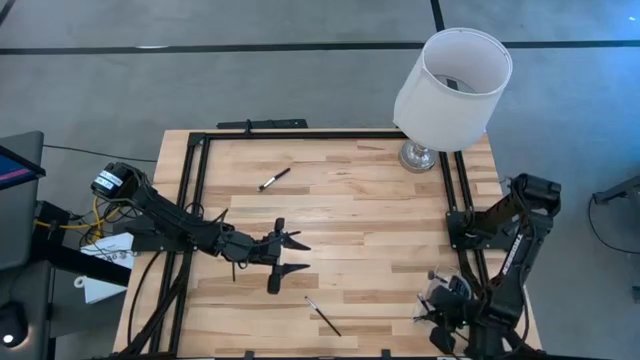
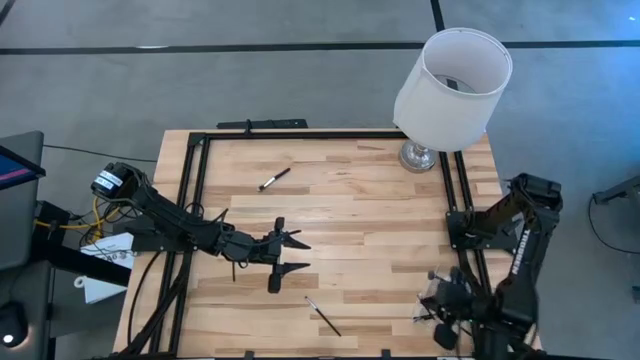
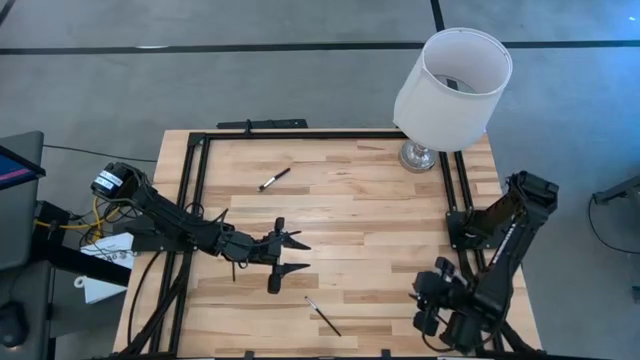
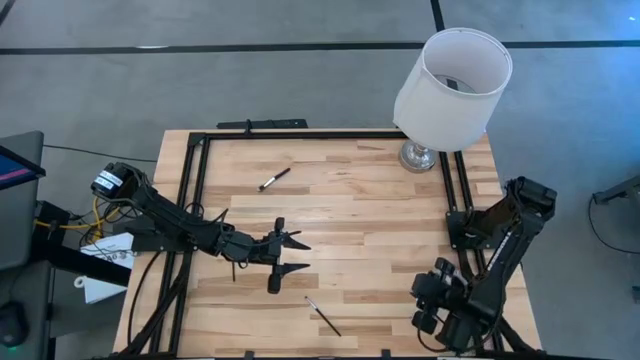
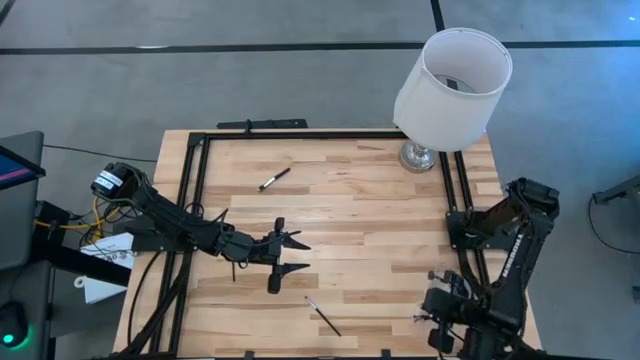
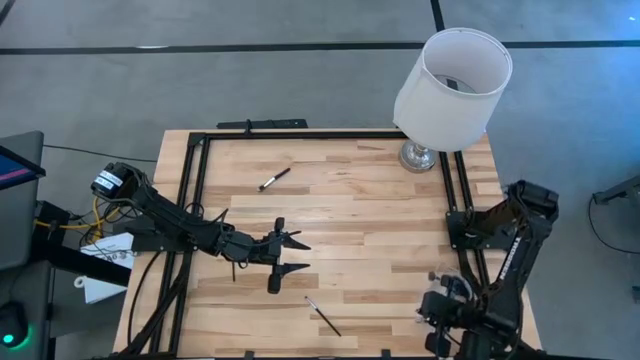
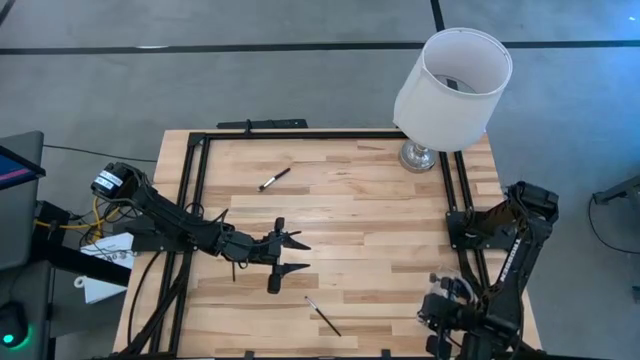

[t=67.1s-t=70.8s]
Task: Pick & Place Makeup Brushes
Adjust the brushes in the transparent organizer

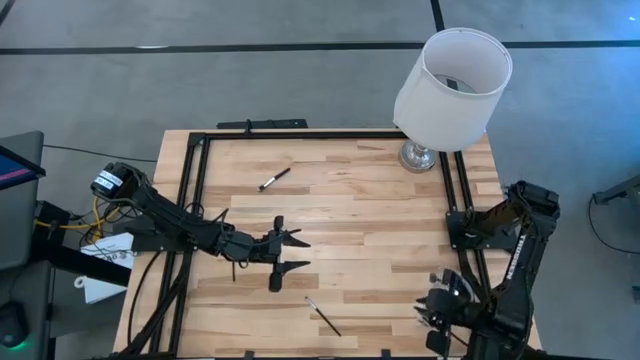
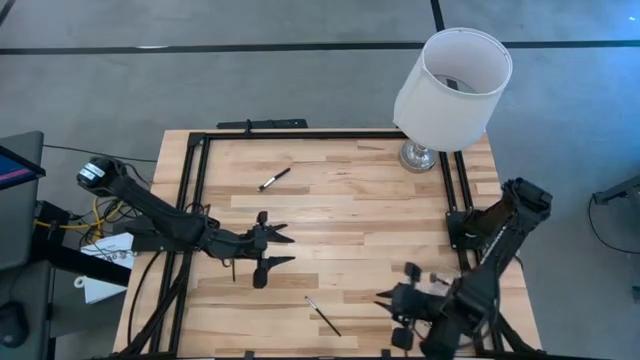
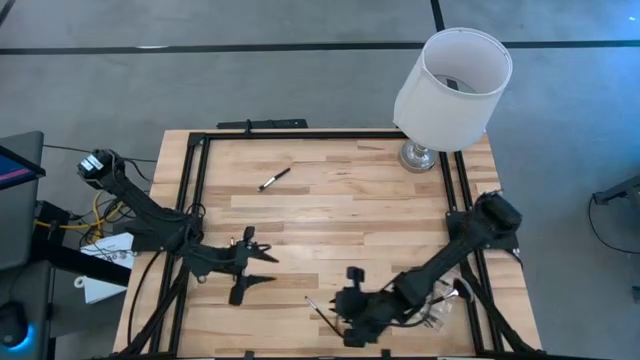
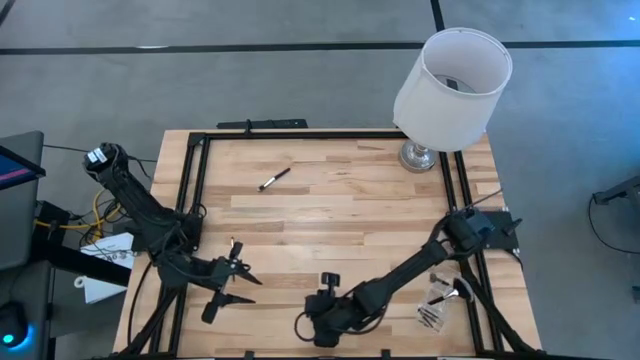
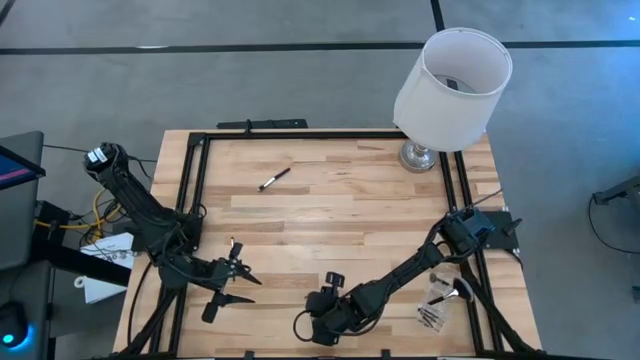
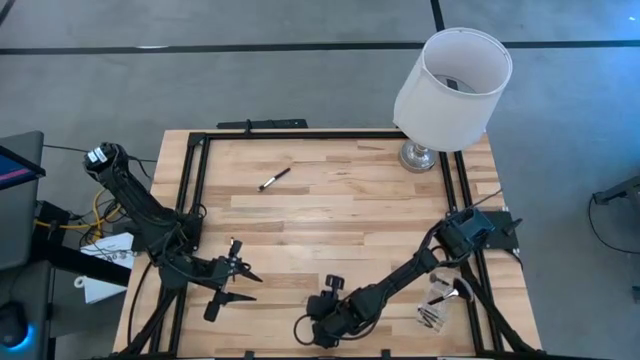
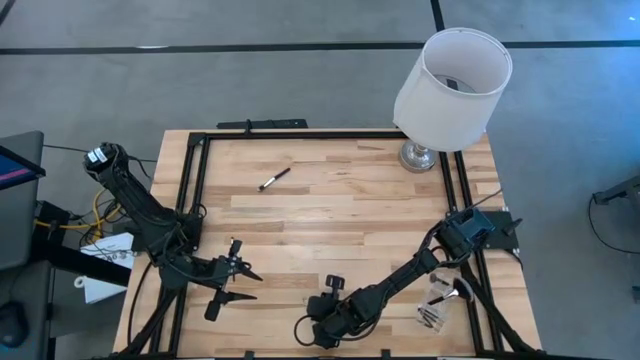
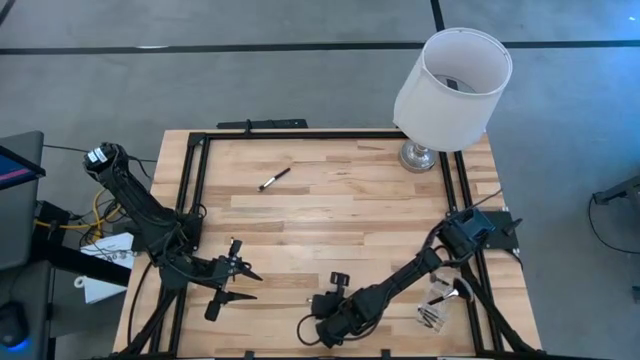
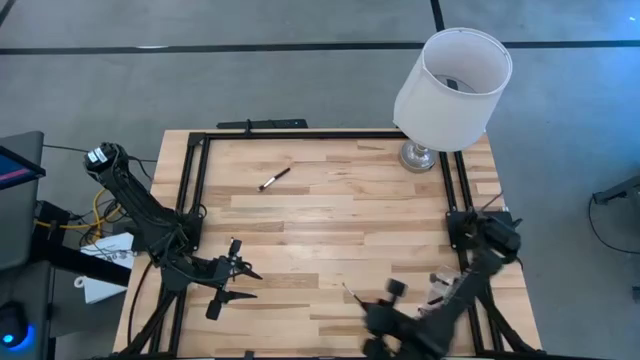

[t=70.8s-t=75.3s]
Put the black eyeshadow brush into the transparent organizer

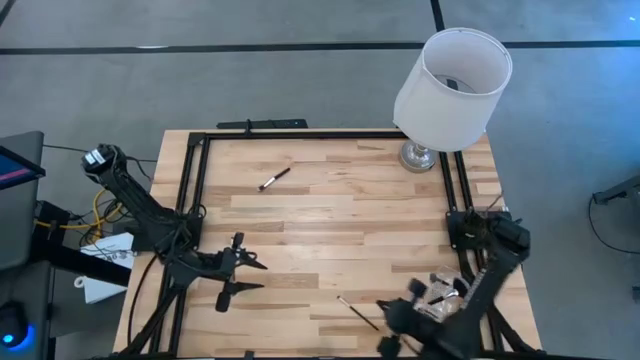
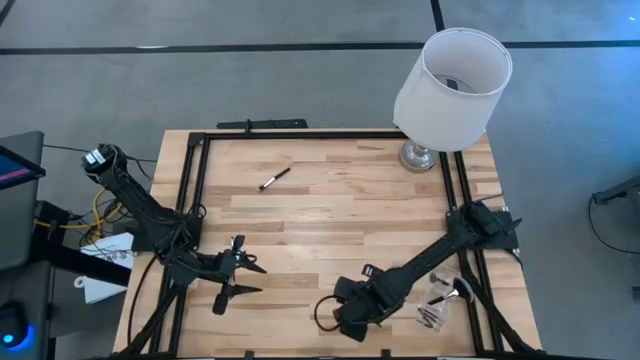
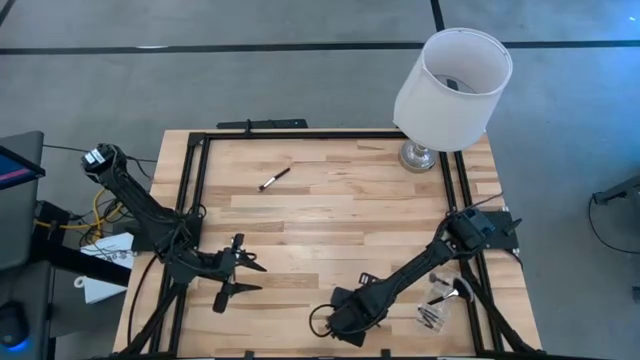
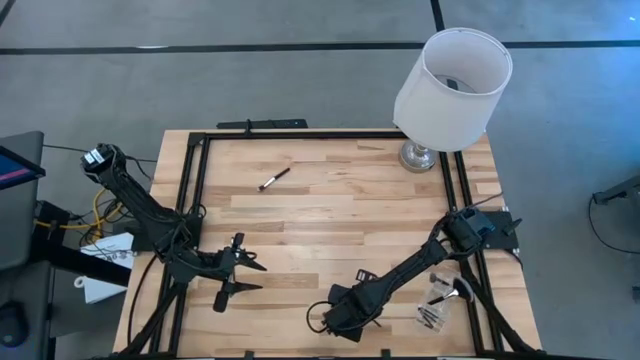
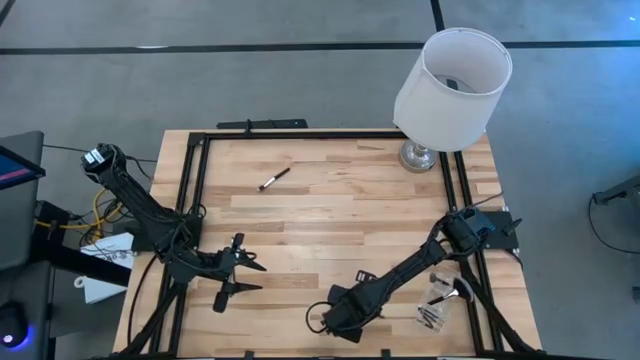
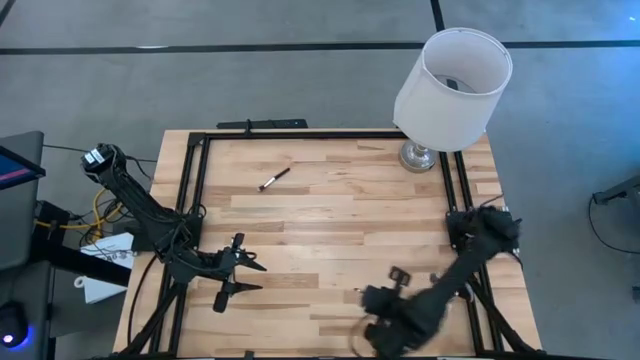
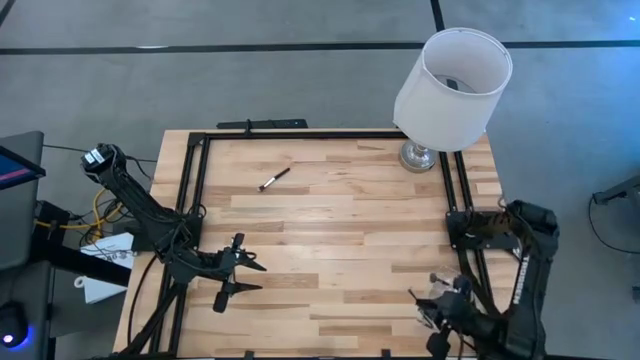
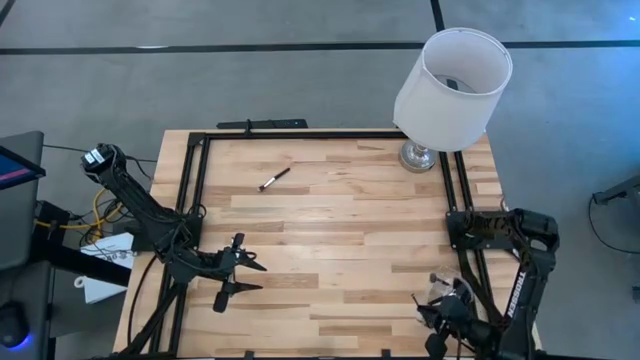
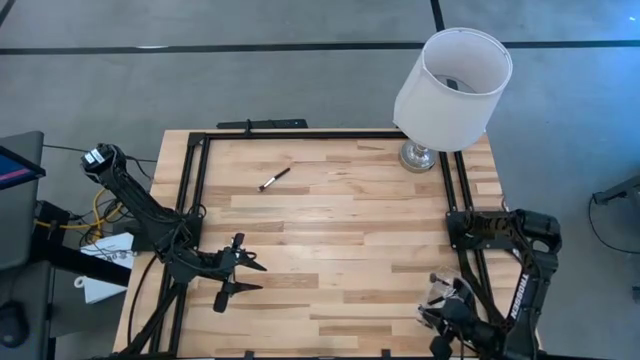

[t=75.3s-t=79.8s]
Put the black eyeshadow brush into the transparent organizer

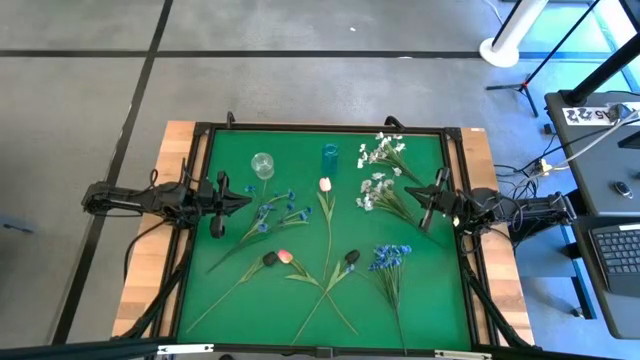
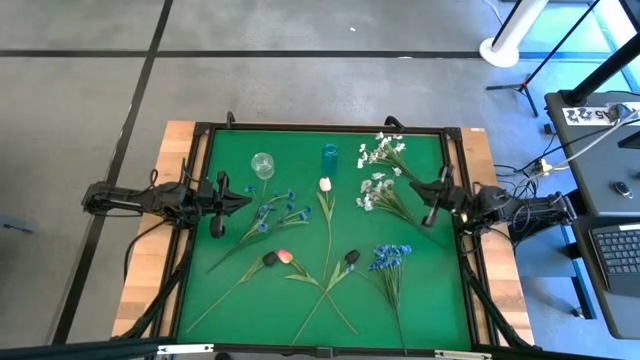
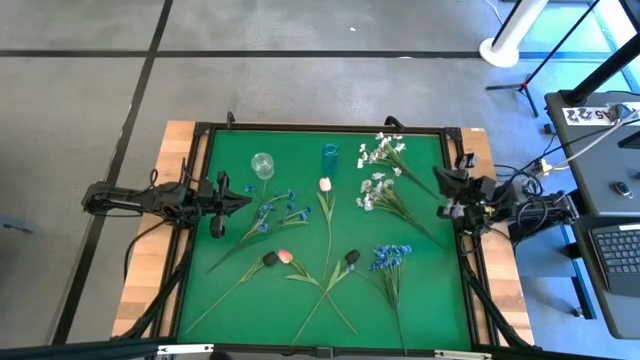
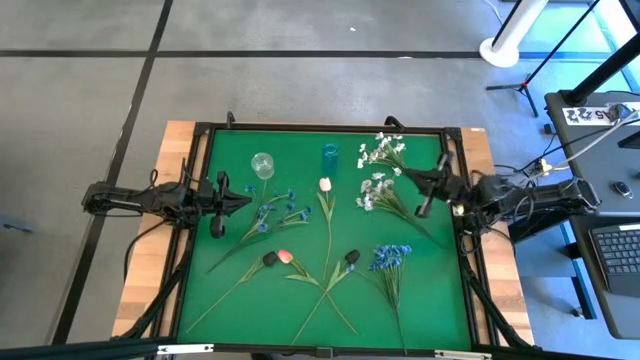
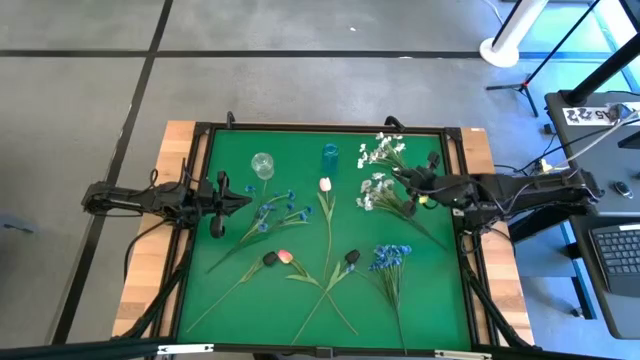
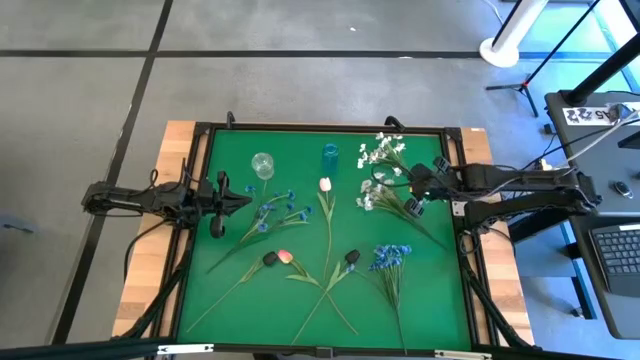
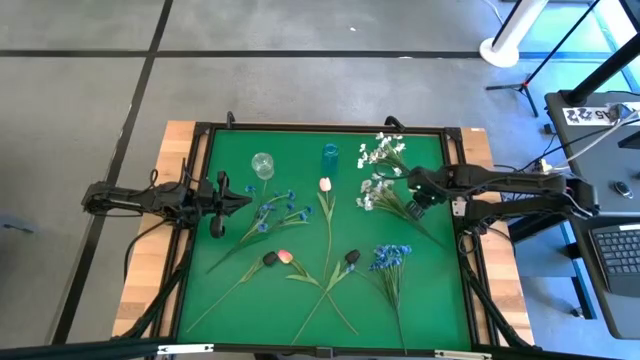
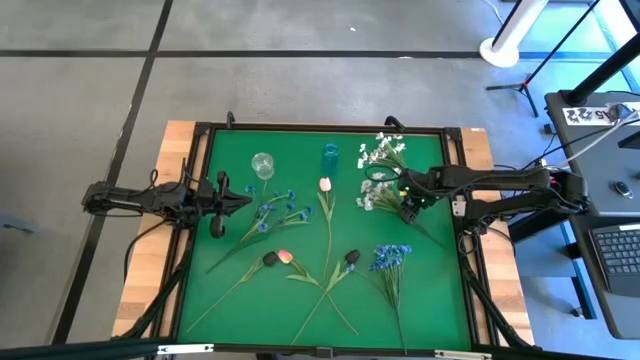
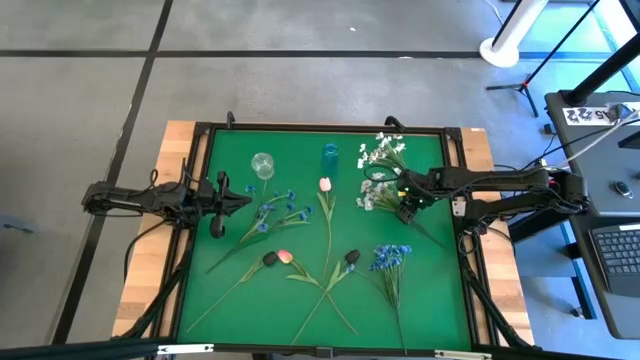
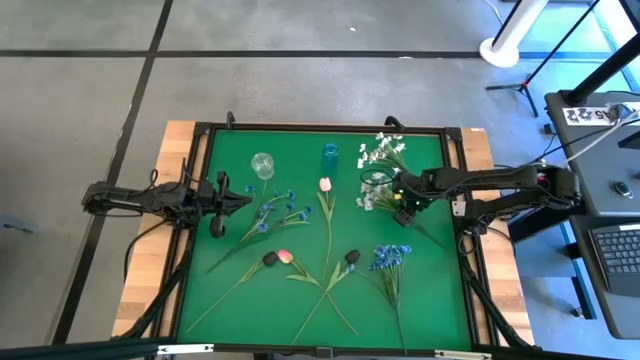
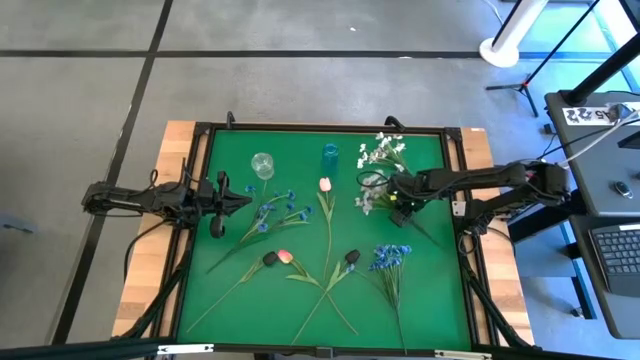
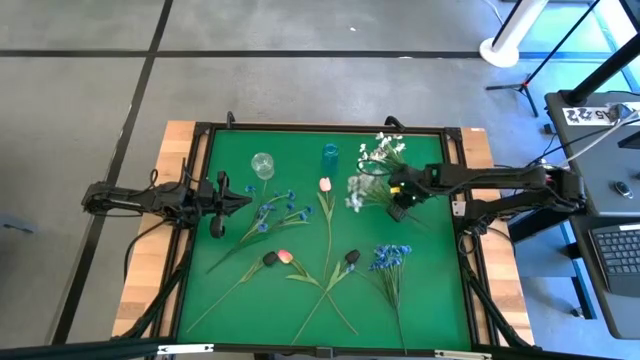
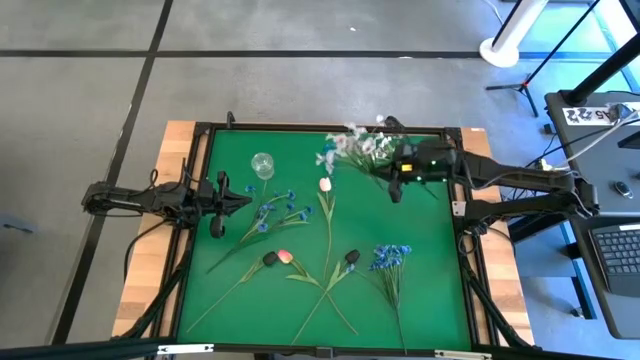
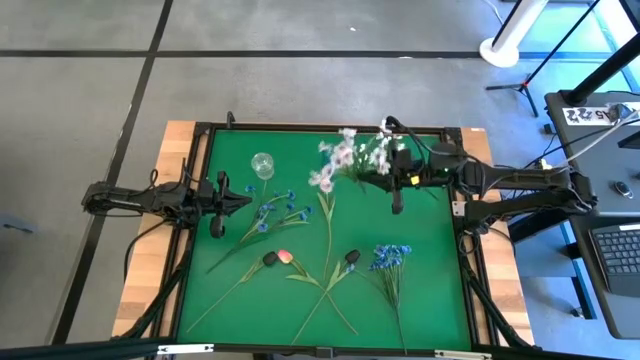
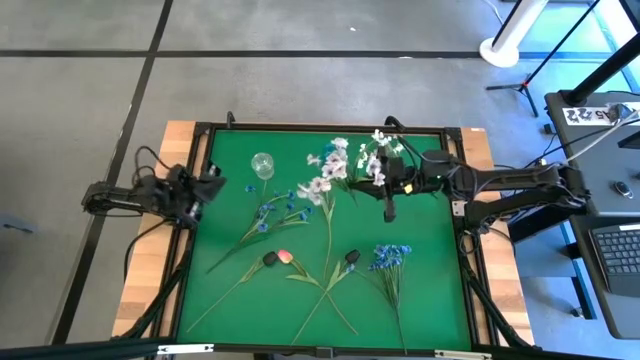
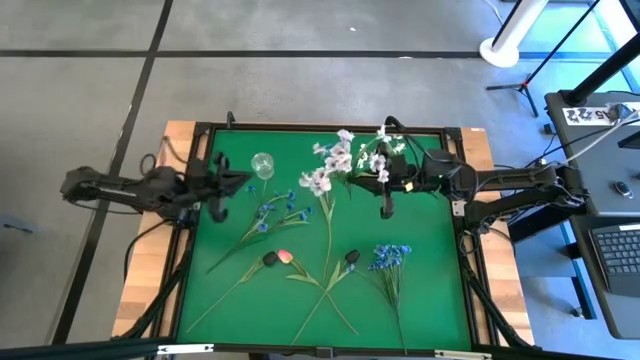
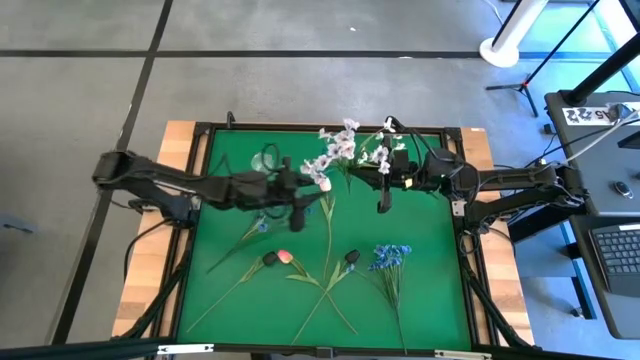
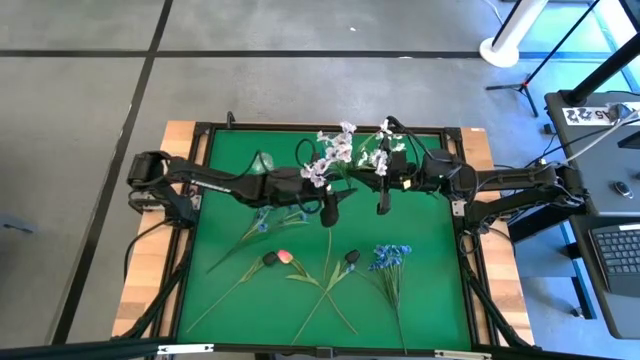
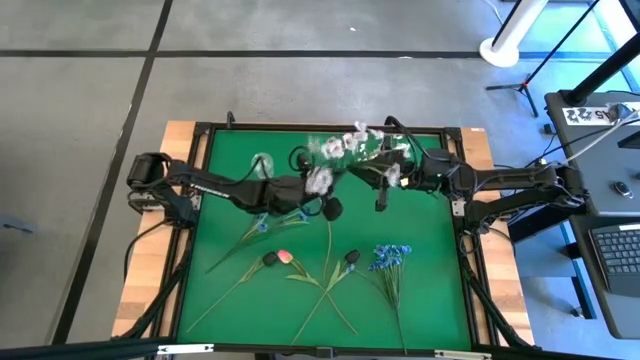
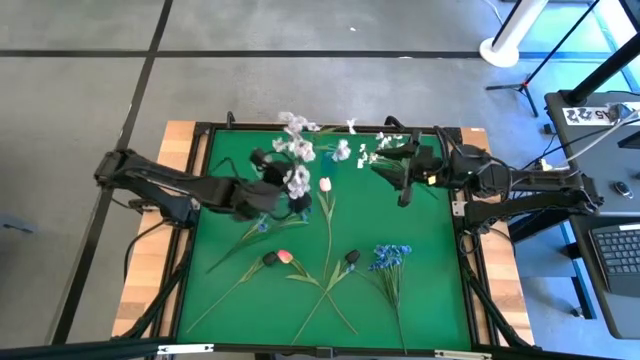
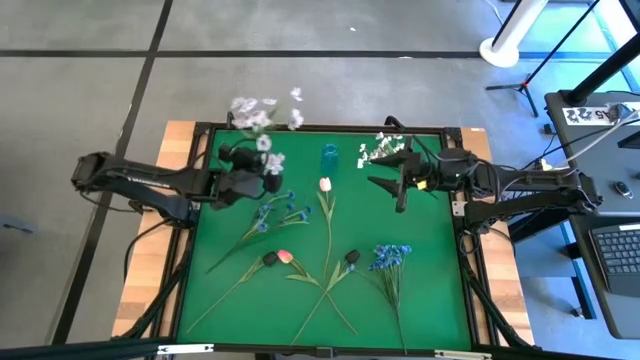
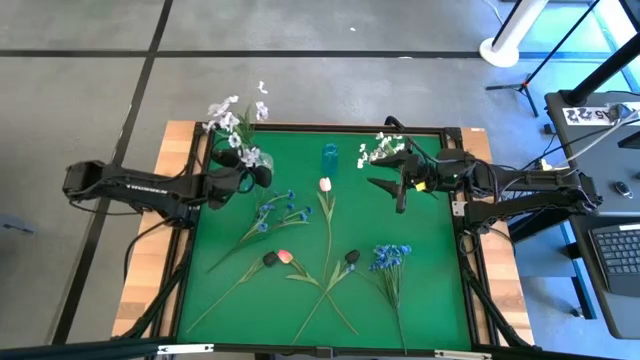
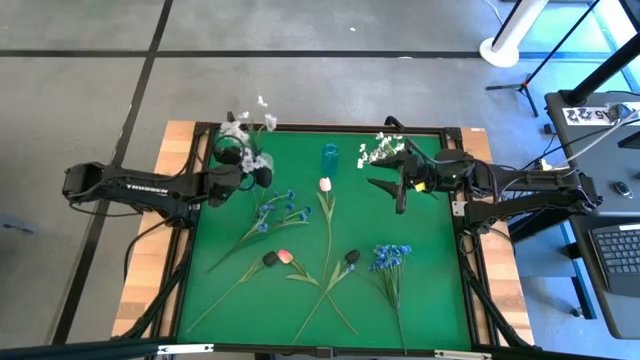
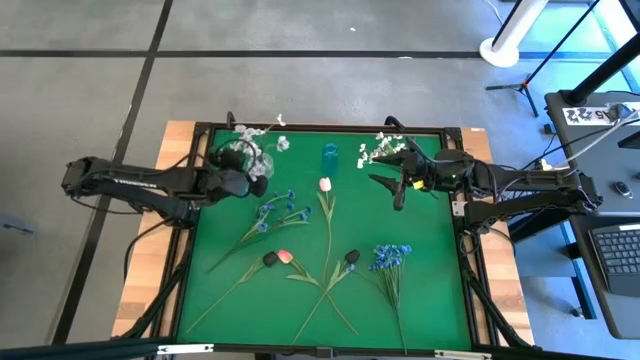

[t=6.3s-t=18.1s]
Task: Sort flowers into vase by color
Put the bottom white flowers into the transparent vase
